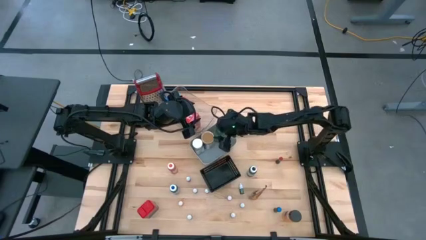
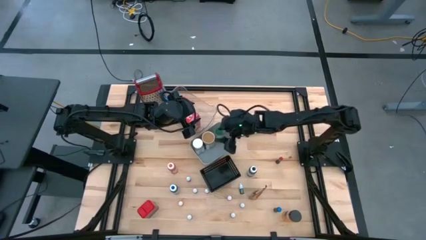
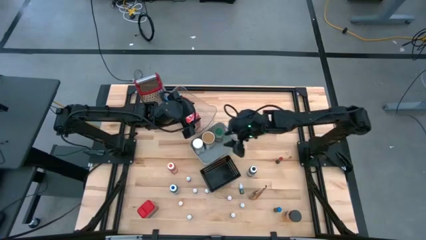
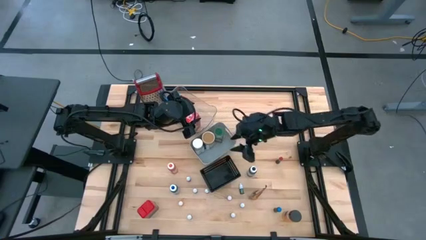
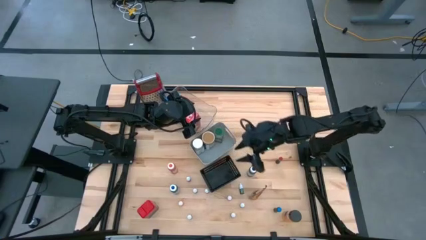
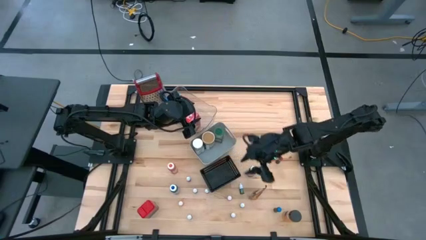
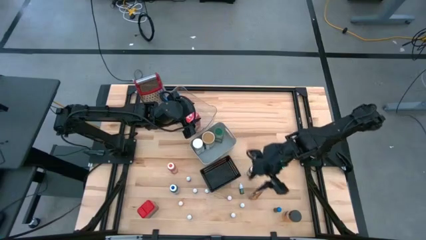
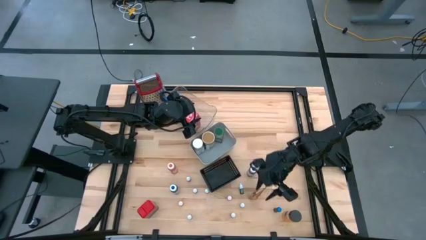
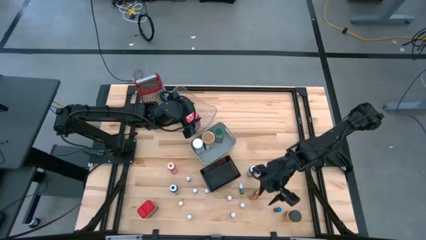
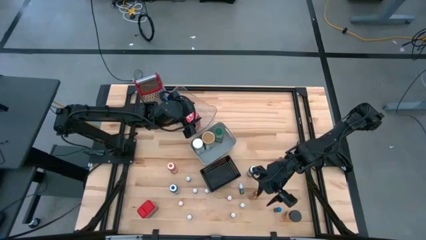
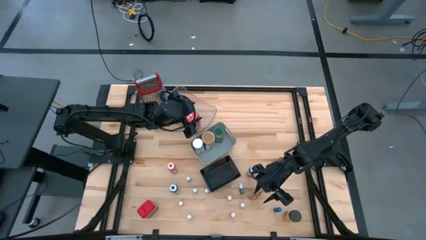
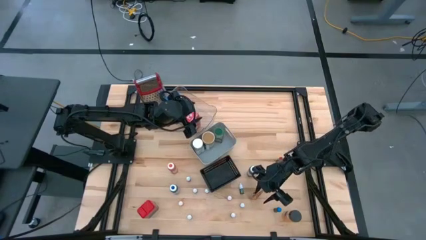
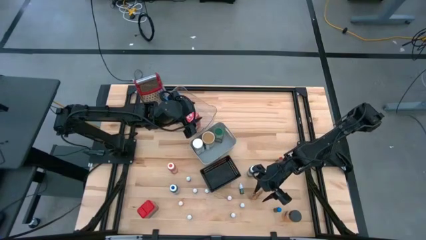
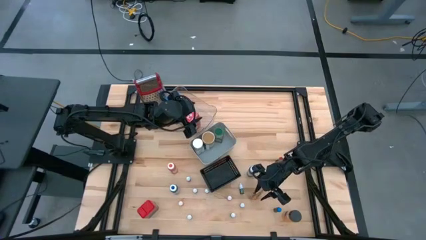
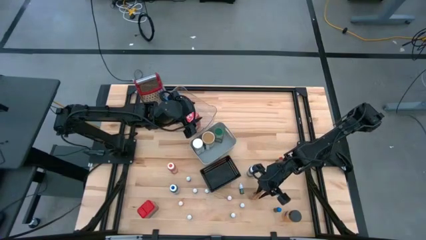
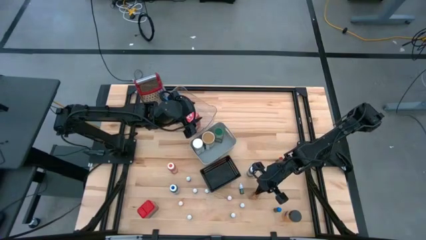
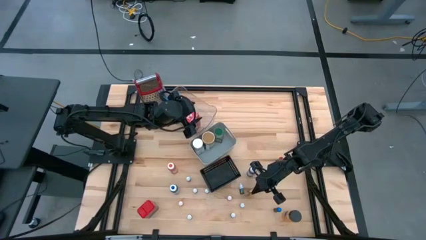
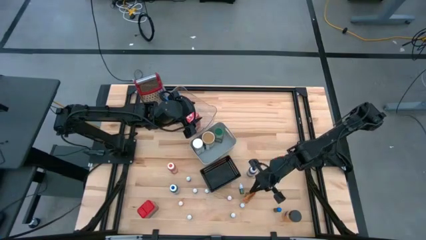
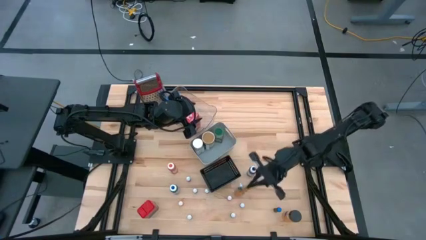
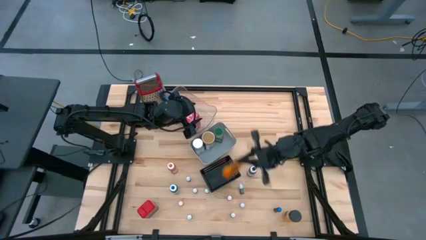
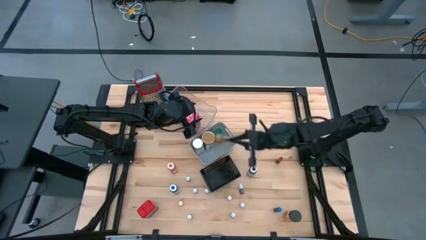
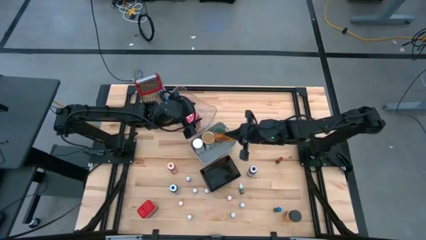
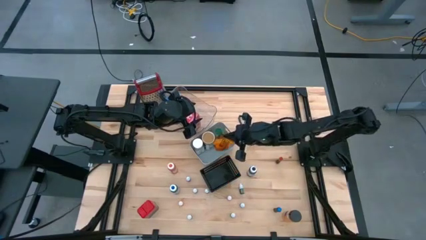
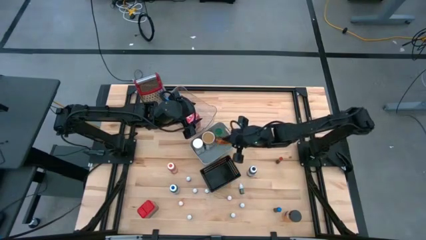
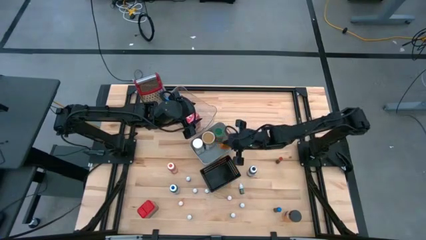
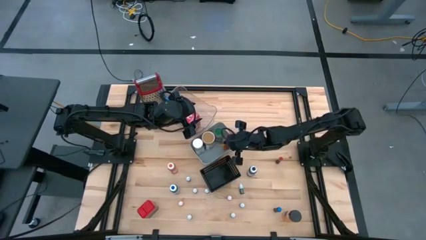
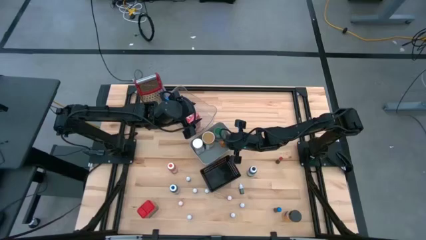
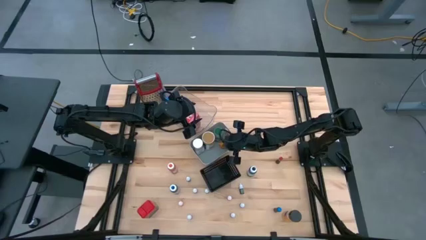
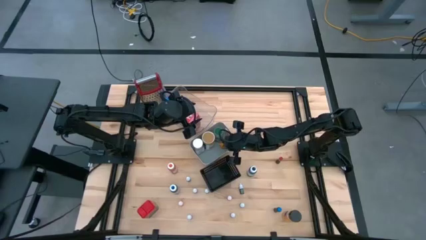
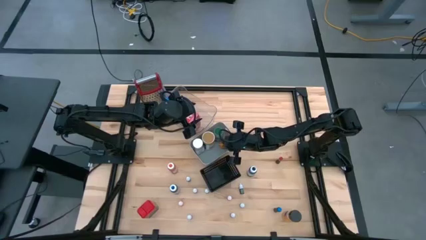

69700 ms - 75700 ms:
Task: Pick & Place Kitchen Items
Put the orange seasoning pack into the white bin

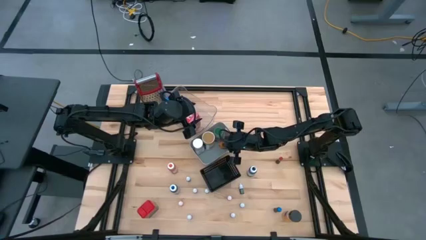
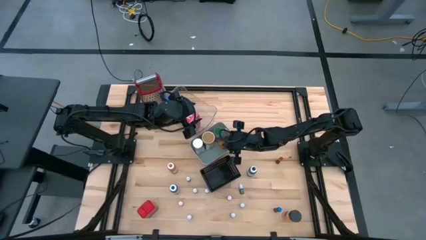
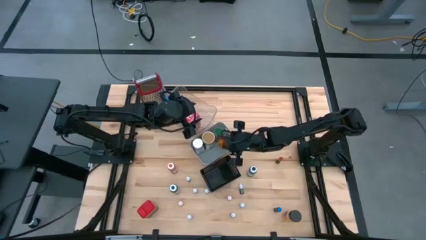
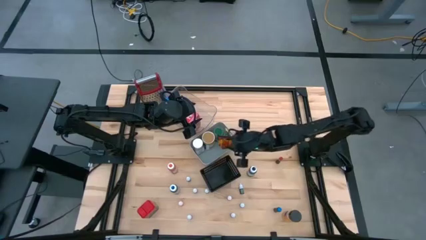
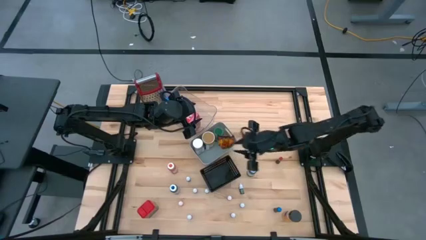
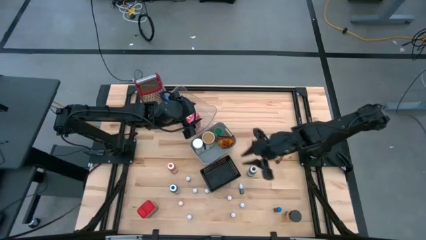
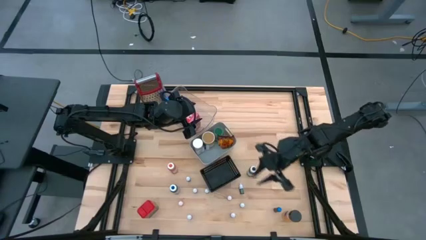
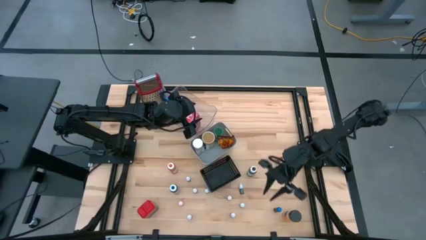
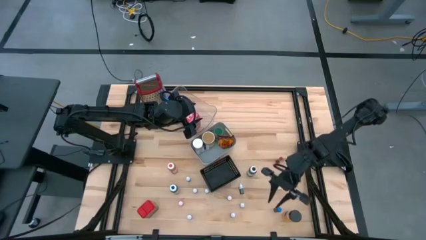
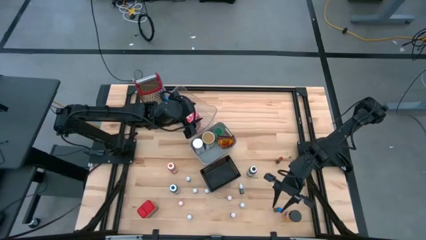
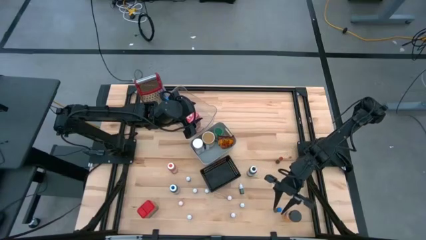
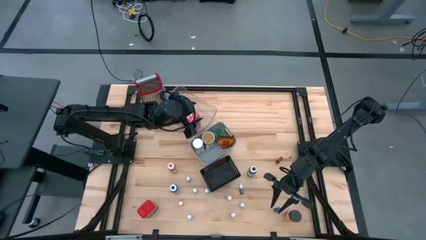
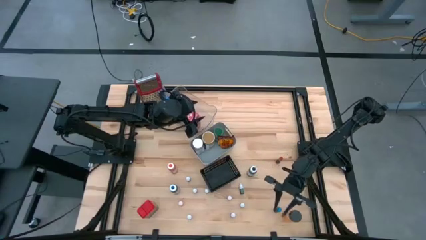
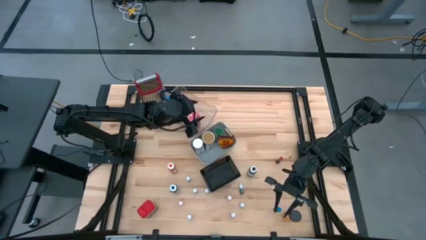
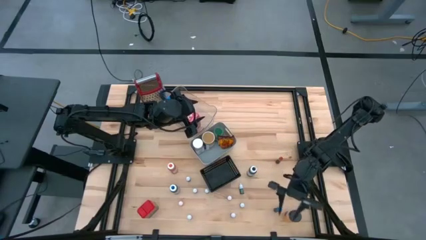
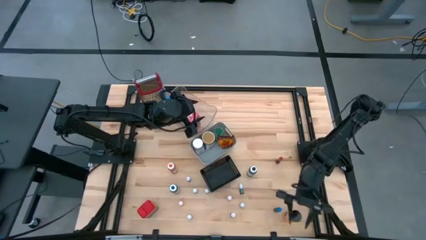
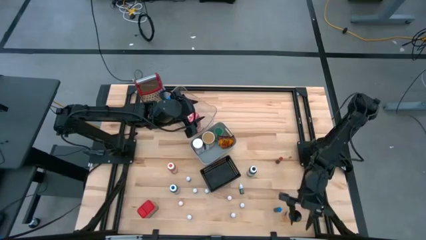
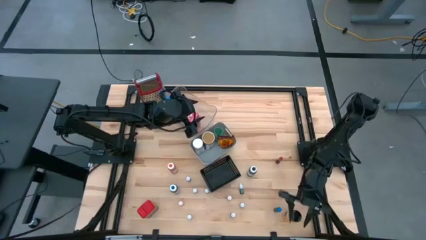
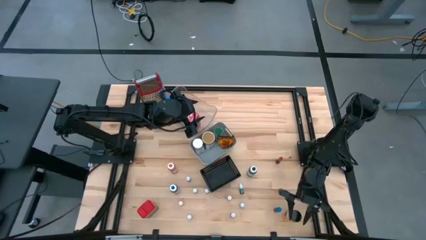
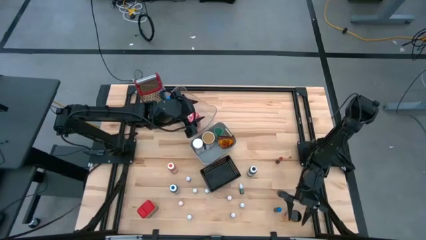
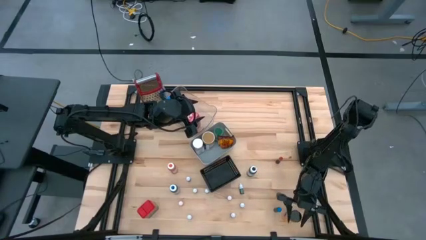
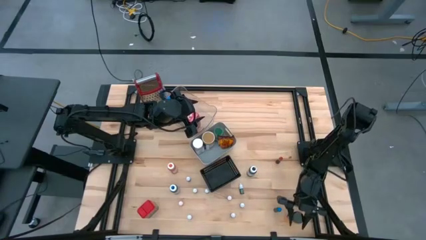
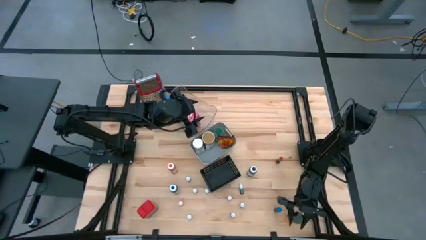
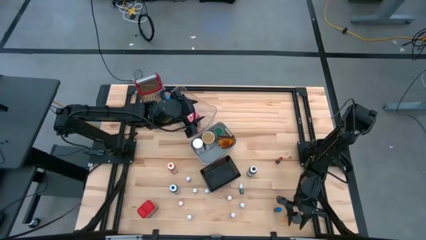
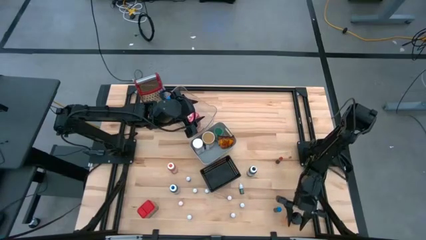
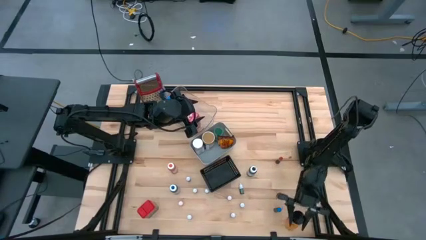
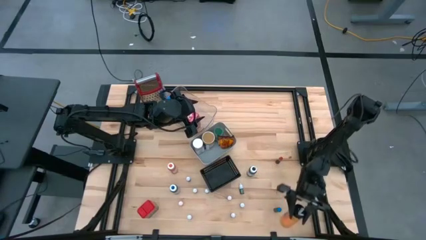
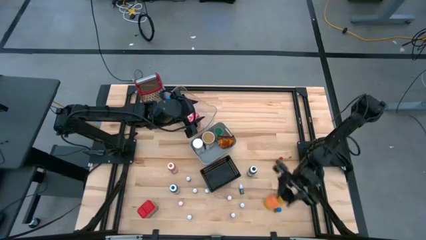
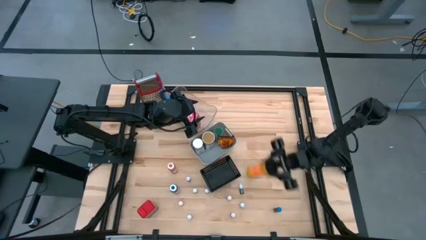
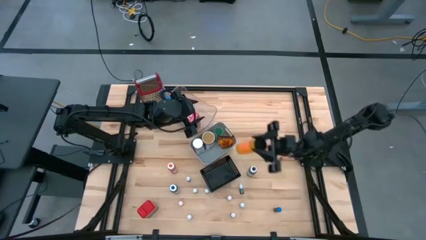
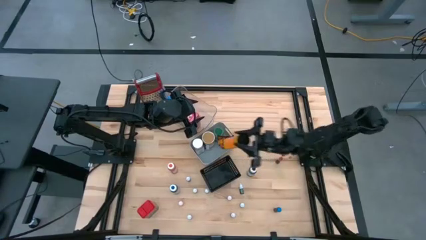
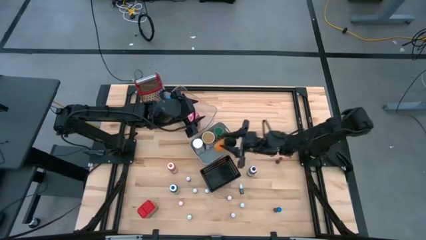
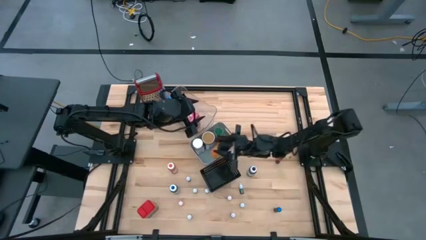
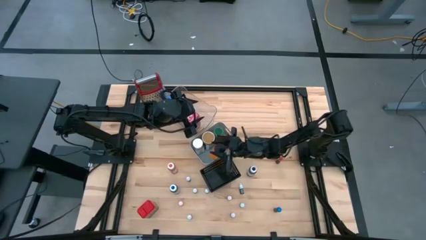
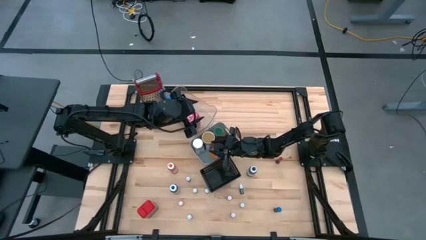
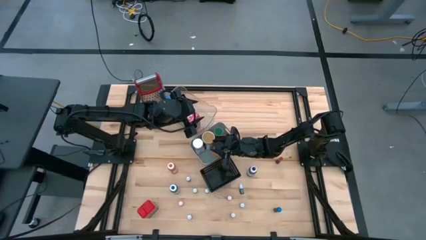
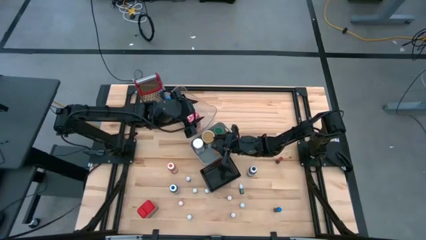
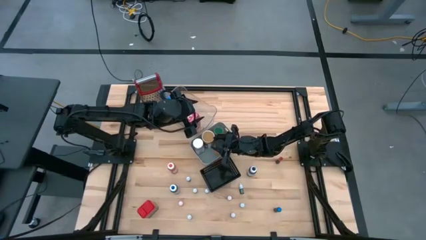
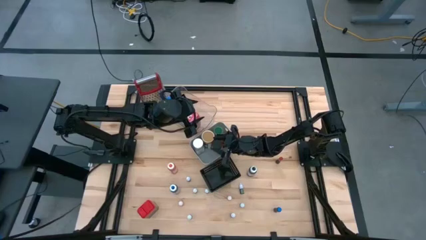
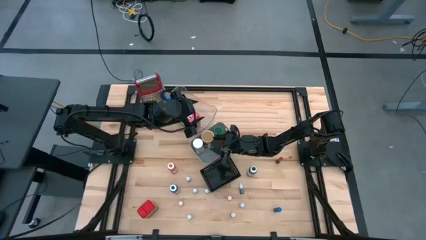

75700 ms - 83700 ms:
Put the black seasoning bottle into the white bin

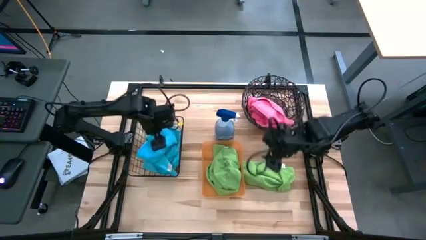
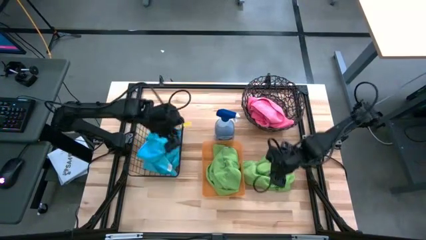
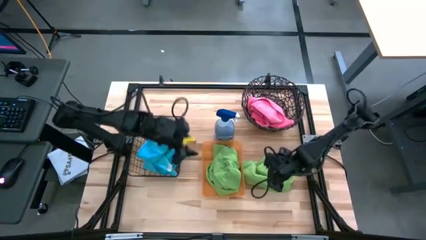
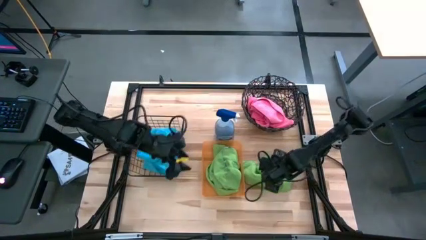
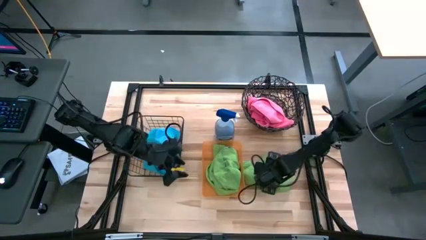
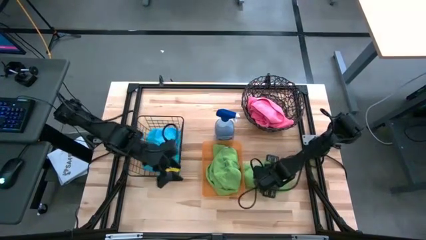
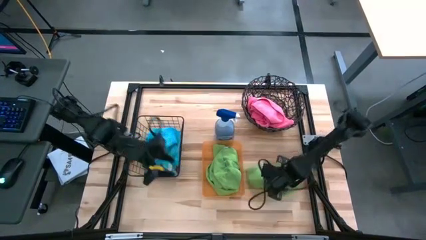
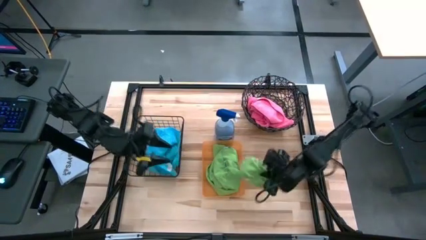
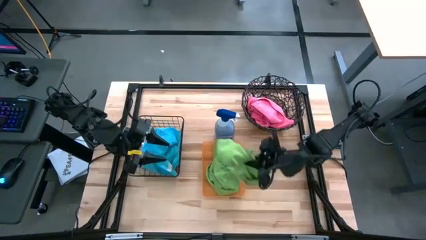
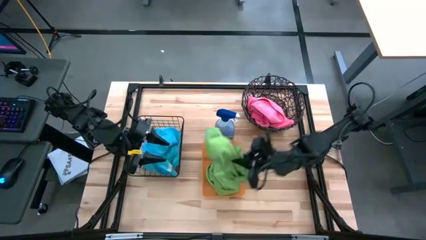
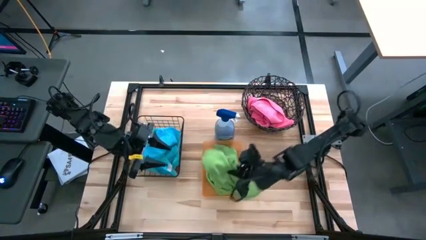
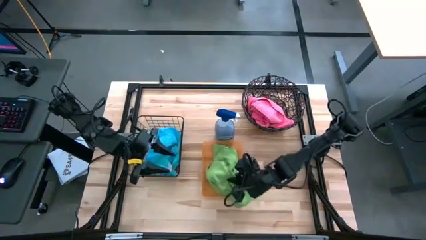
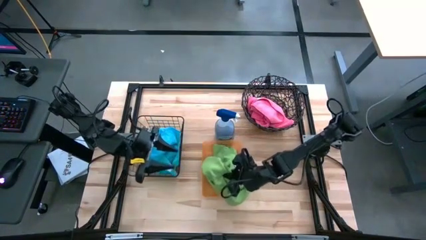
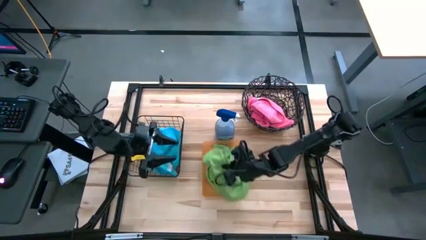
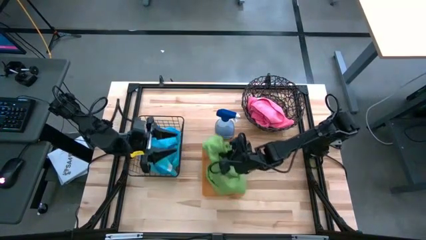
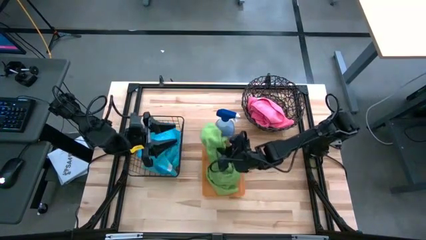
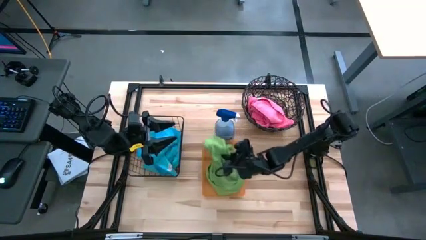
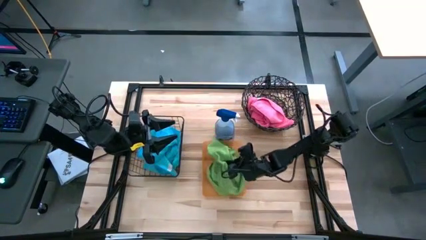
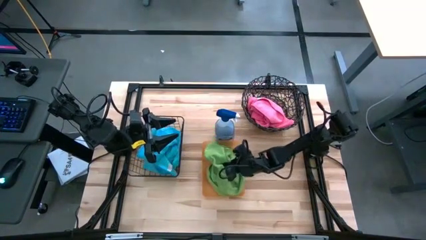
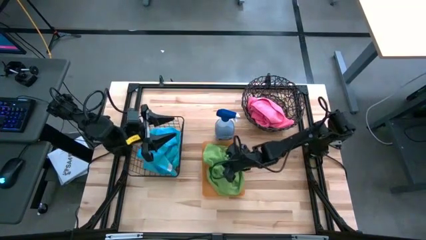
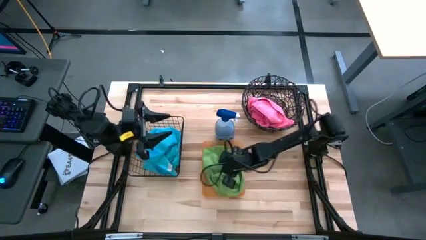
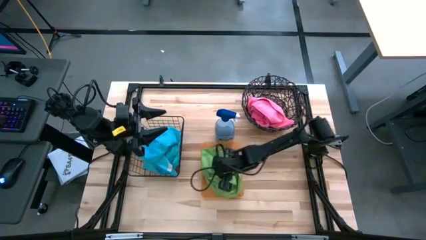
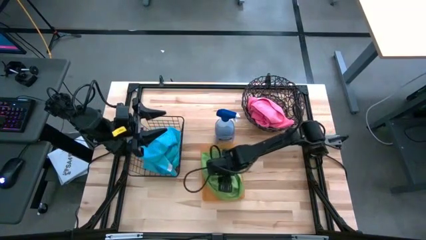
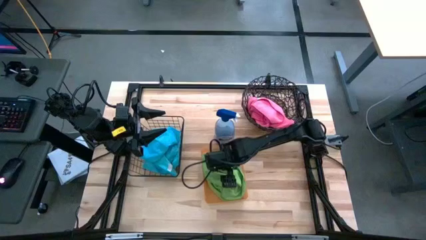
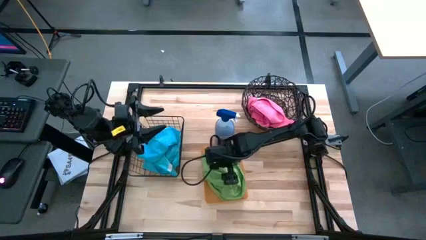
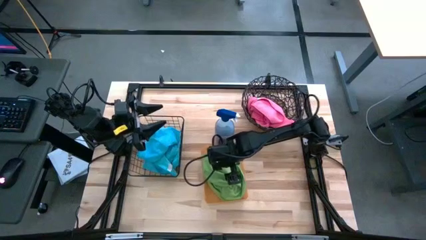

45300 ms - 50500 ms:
Task: Sort microfiber towel by color & place in baskets
Put the green microfiber cloth into the transparent orange bin
